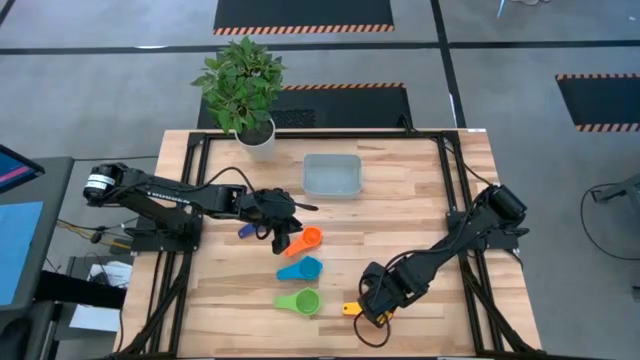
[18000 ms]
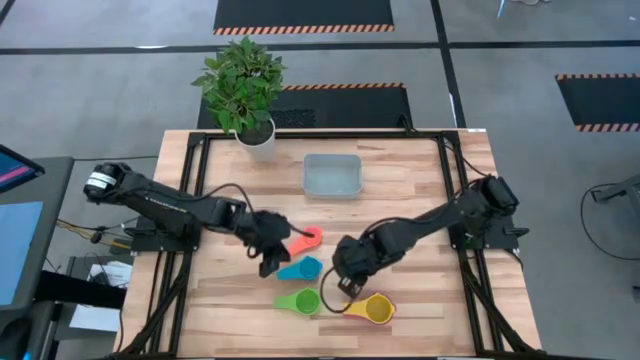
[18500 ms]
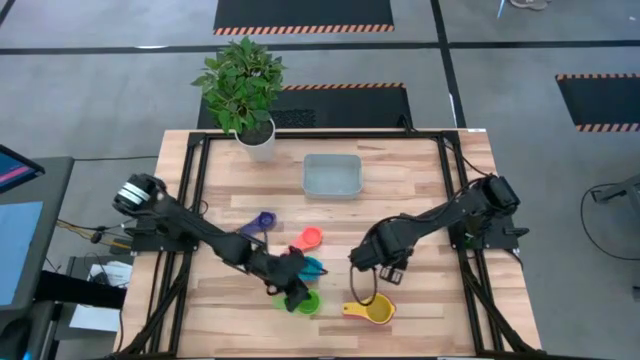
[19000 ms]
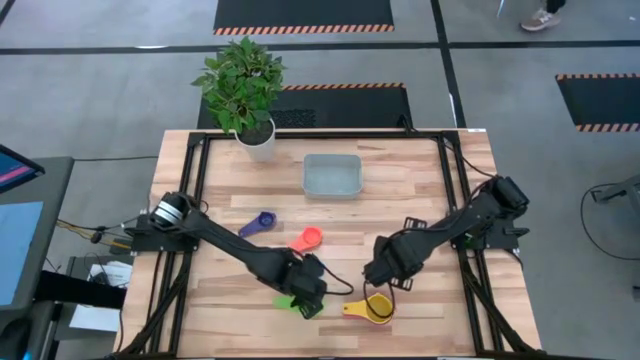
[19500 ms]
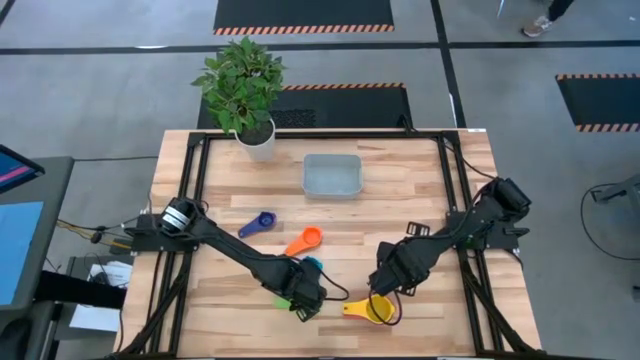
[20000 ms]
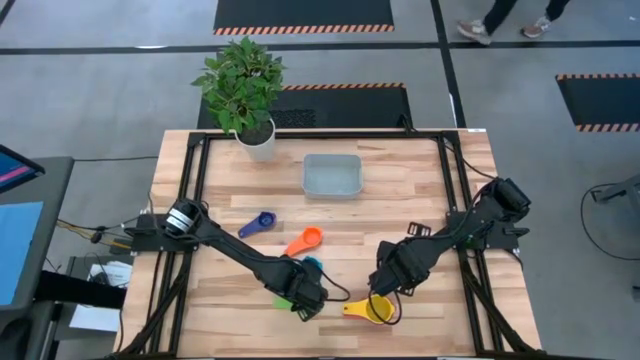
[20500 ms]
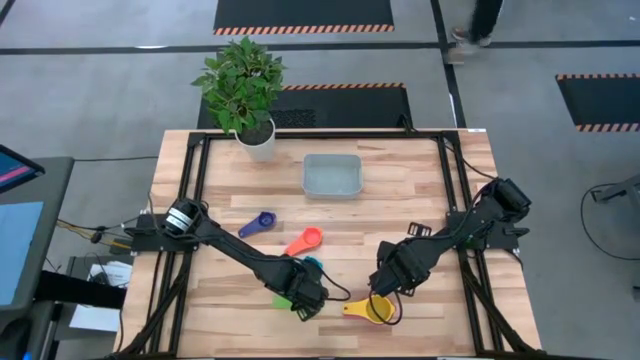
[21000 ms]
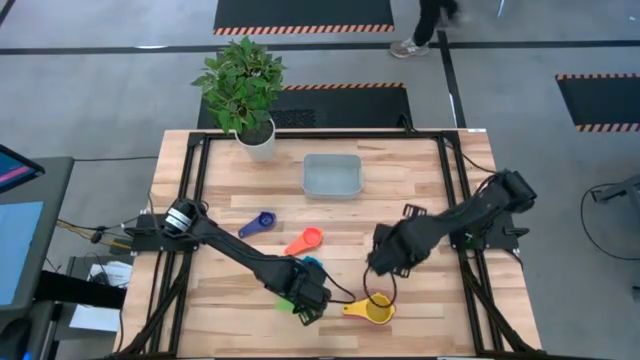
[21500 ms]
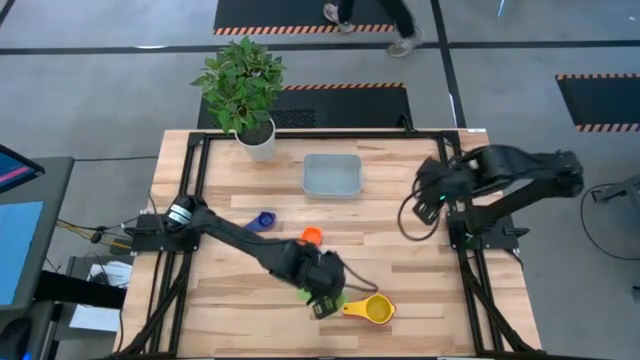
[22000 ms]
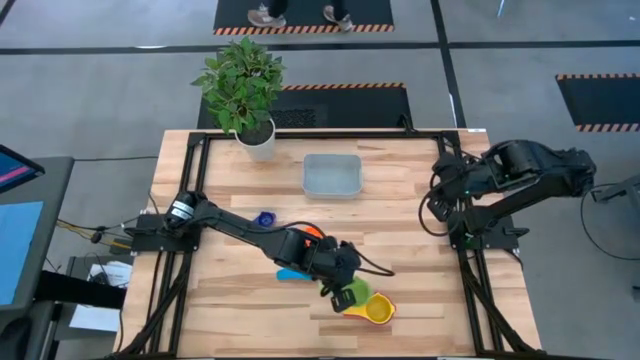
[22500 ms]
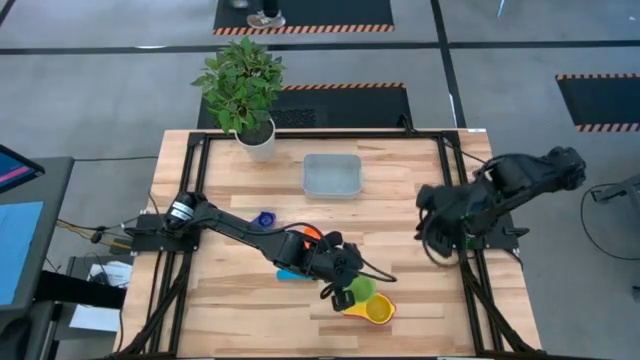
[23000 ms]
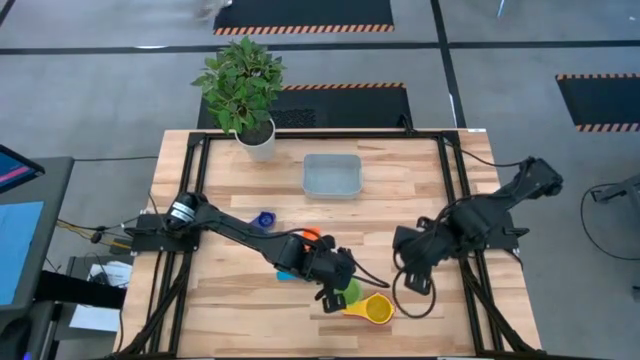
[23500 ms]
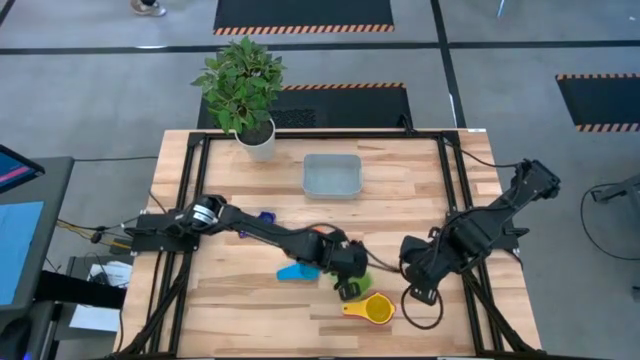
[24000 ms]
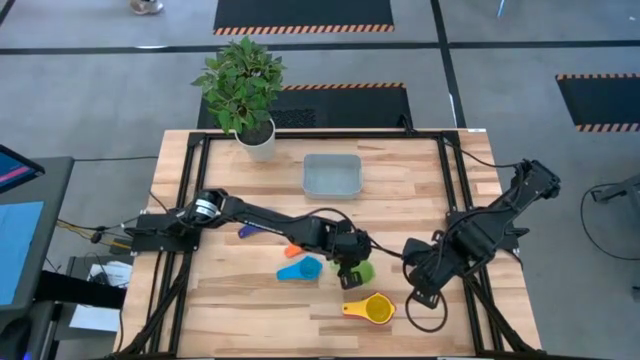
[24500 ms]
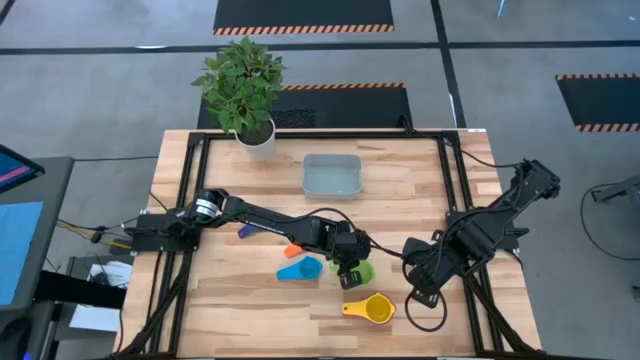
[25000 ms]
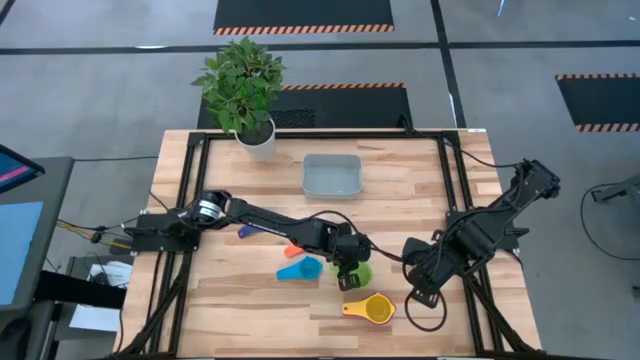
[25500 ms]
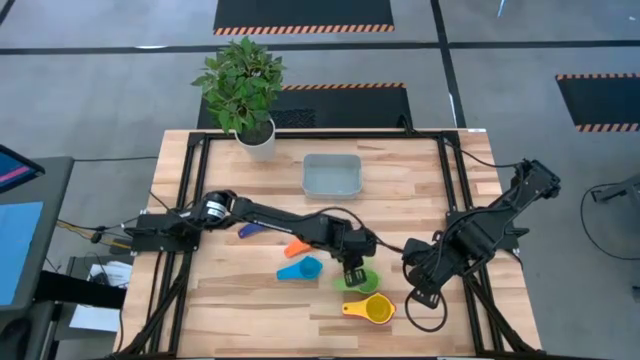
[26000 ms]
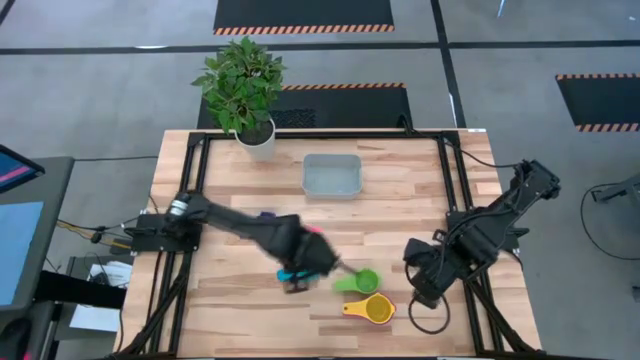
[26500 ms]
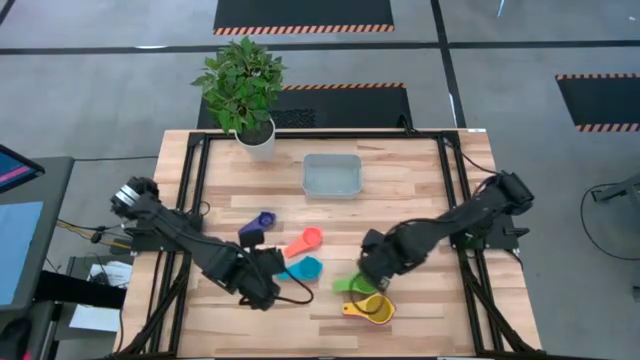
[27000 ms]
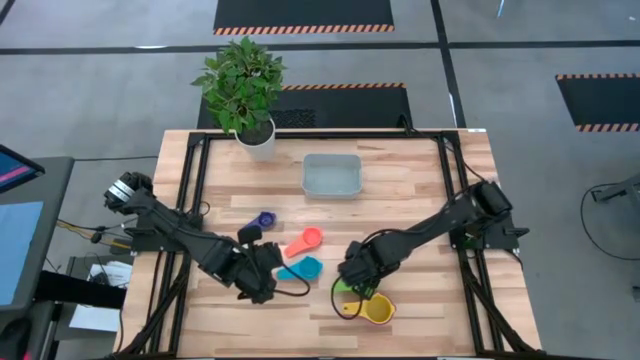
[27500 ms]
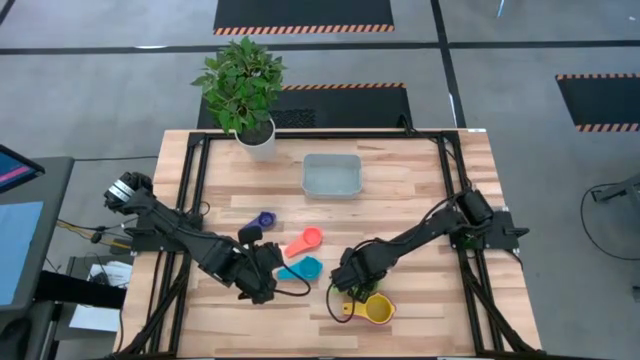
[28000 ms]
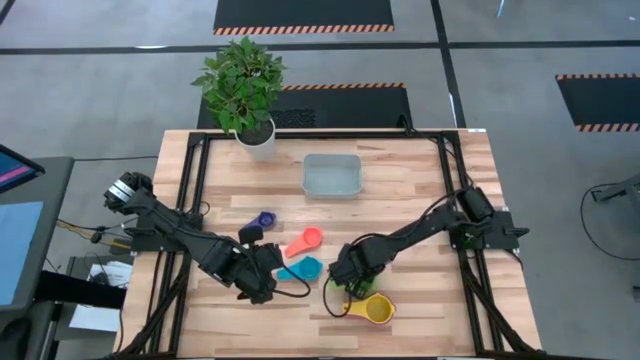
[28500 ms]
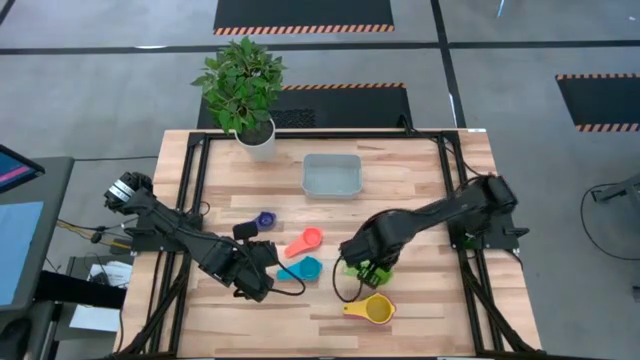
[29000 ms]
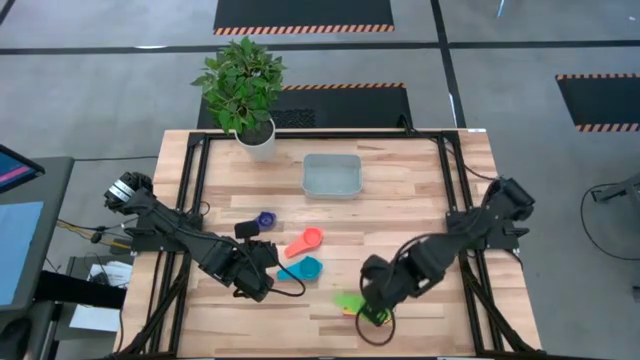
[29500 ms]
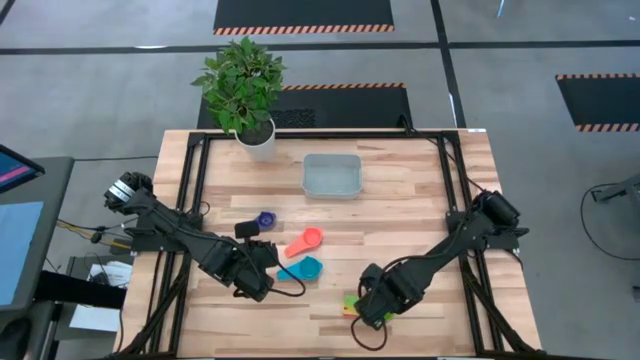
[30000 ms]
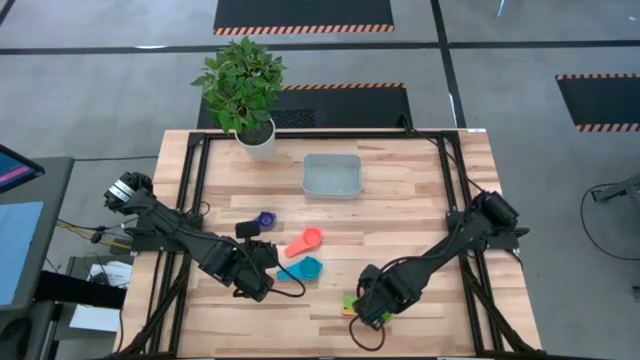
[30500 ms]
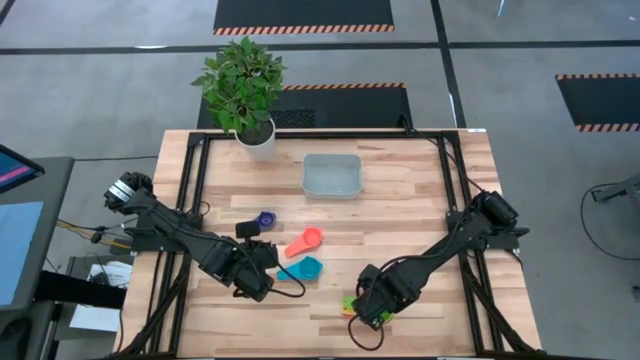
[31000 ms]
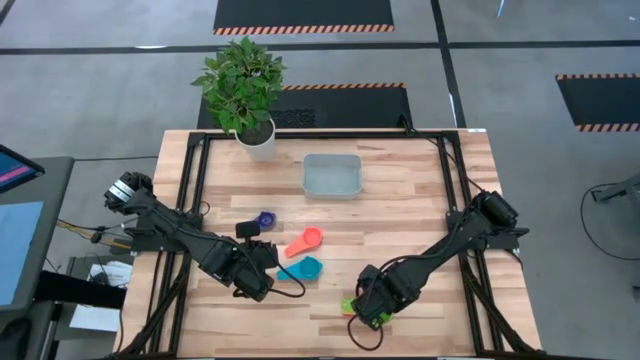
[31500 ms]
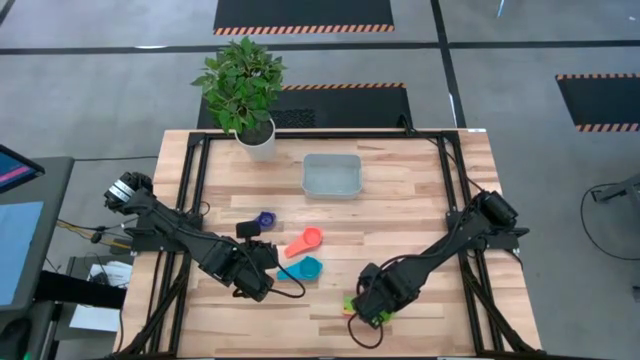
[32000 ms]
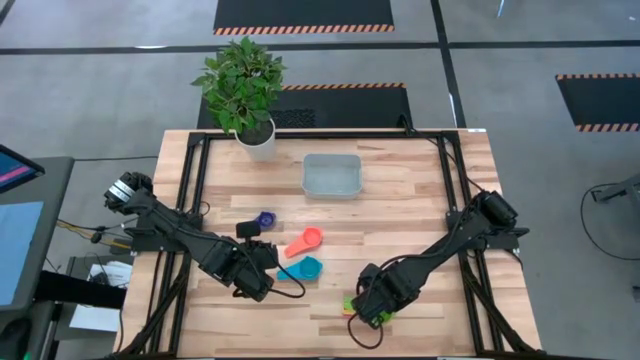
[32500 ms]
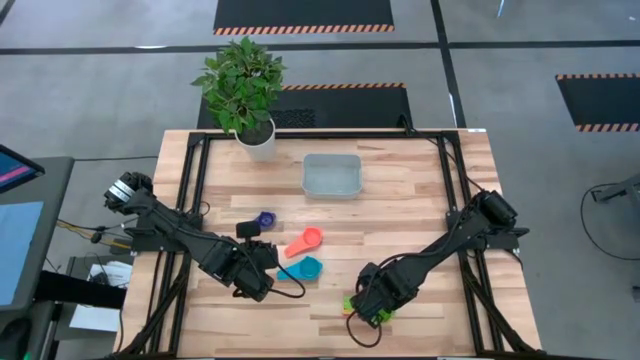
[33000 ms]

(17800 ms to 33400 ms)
Task: Nest measuring cups in basket
Stack the green measuring cup on top of the yellow measuring cup

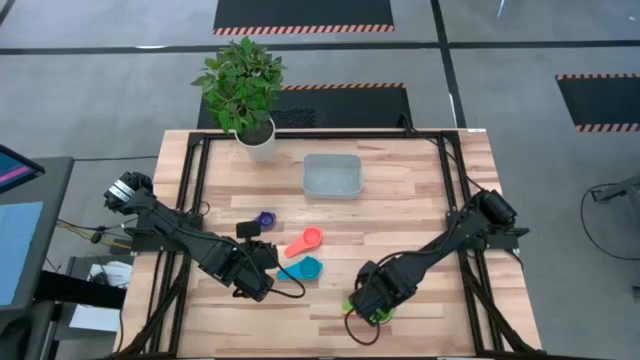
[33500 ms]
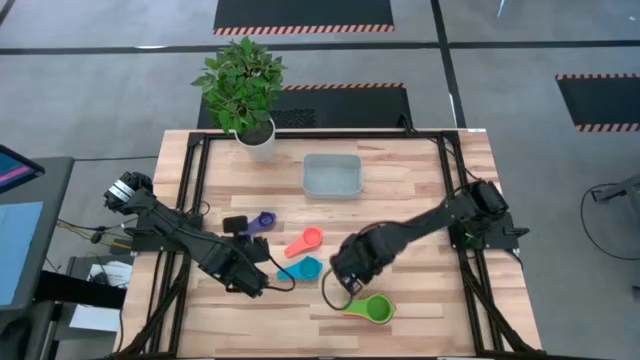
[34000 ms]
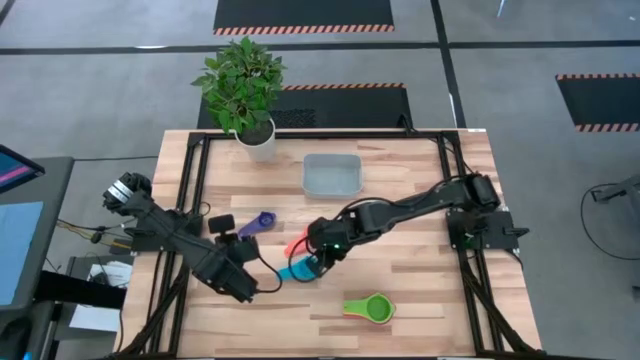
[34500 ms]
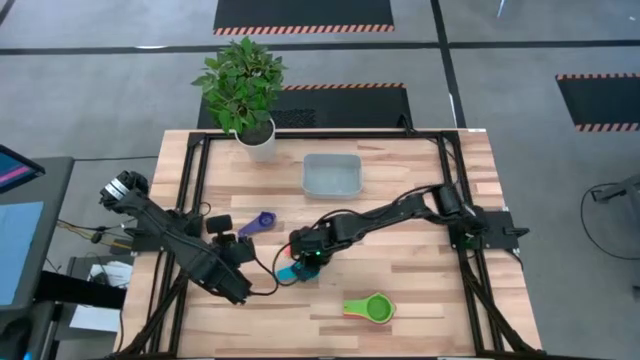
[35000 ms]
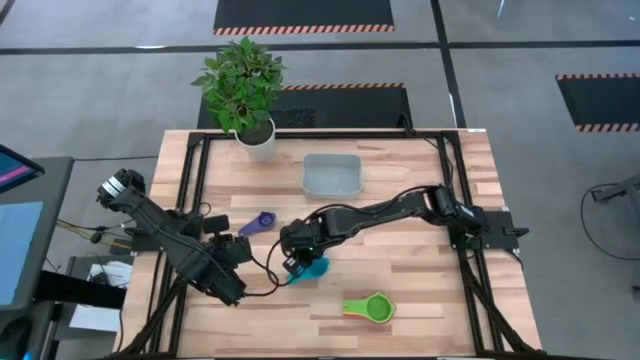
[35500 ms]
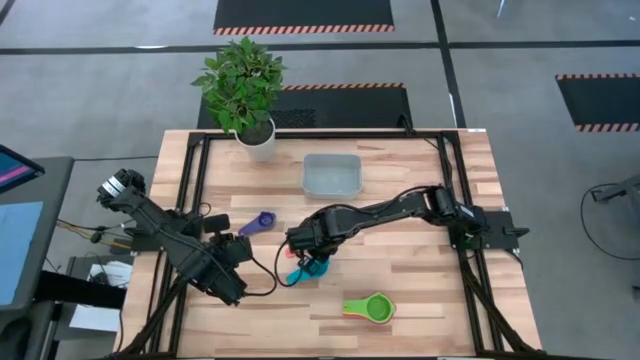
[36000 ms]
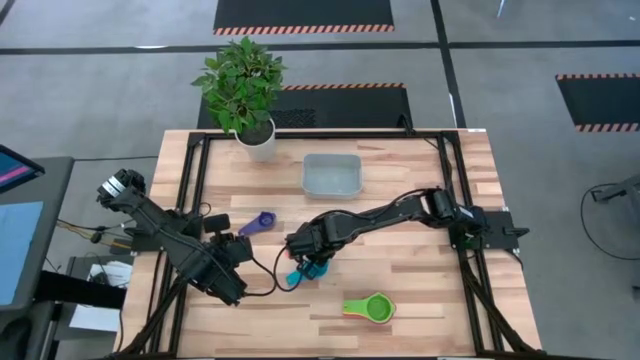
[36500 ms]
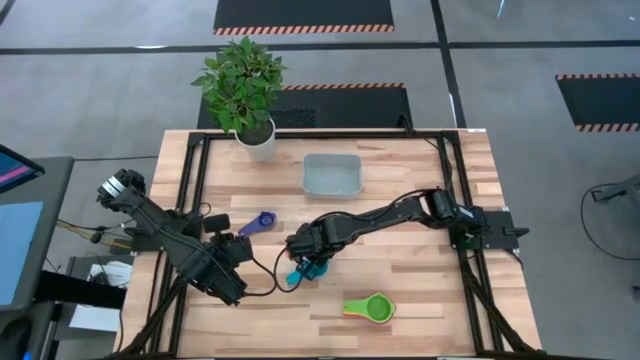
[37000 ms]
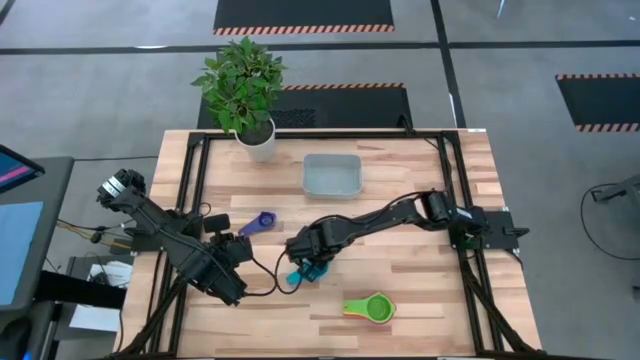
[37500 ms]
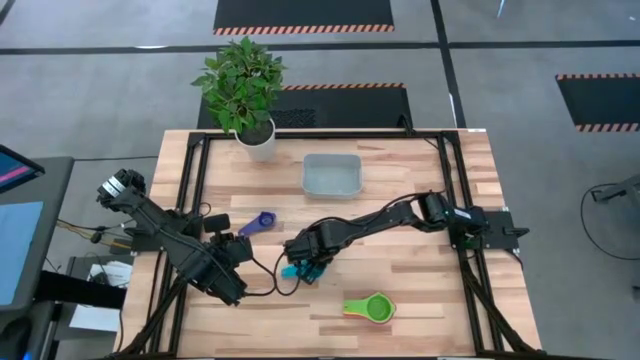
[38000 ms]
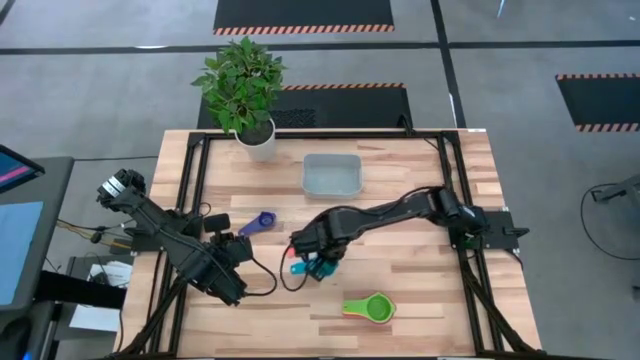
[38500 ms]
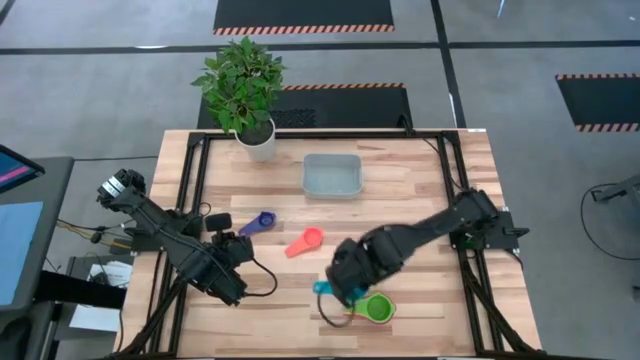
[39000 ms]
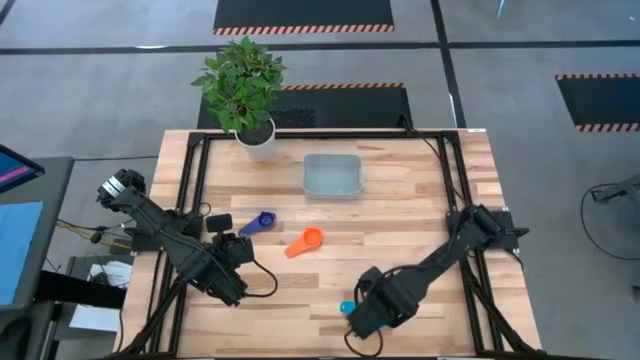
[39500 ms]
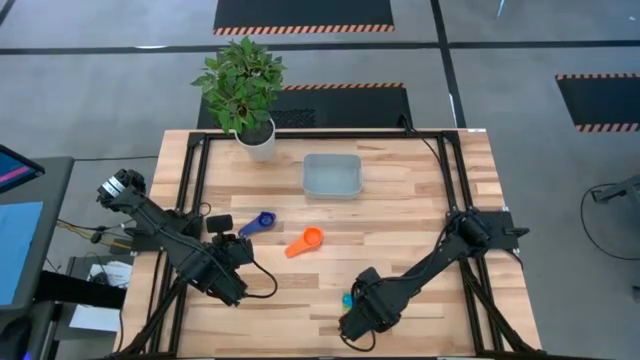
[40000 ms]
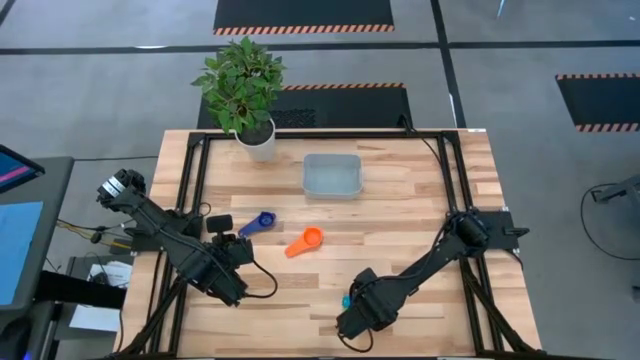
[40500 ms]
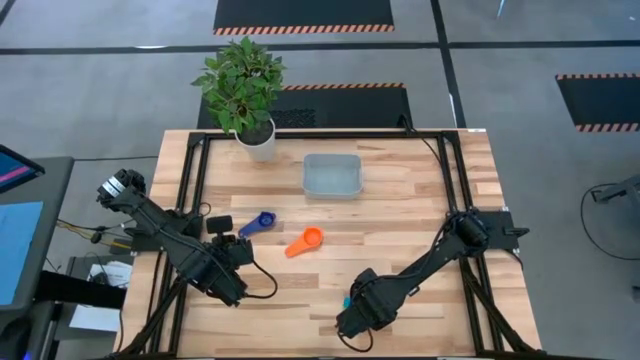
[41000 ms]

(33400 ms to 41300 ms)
Stack the light blue measuring cup on top of the green measuring cup
